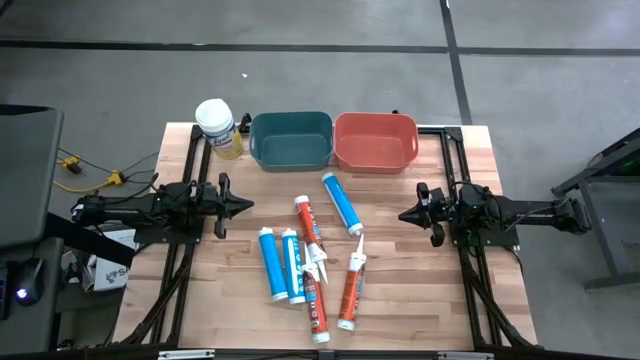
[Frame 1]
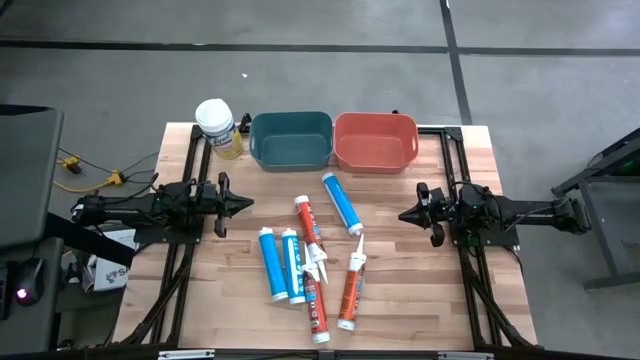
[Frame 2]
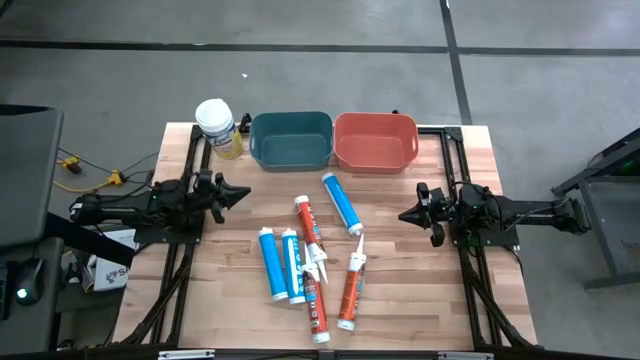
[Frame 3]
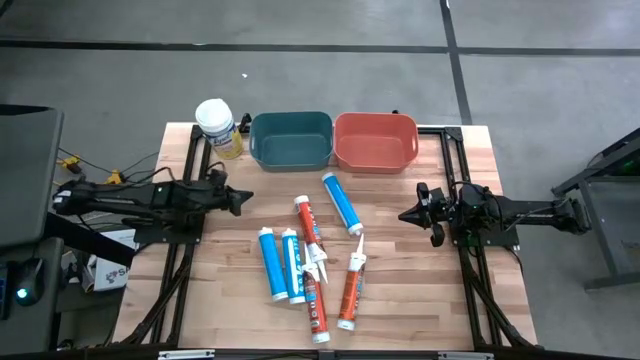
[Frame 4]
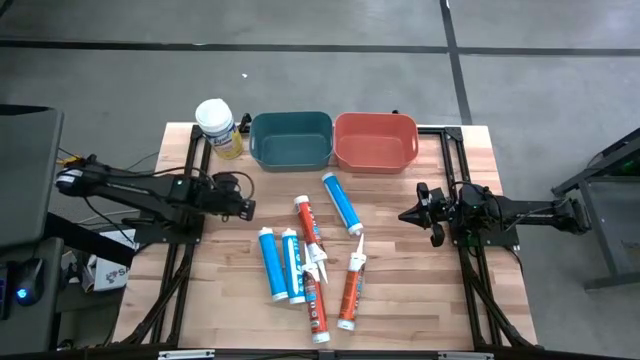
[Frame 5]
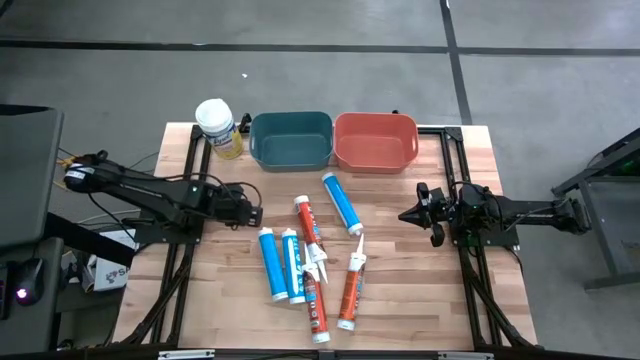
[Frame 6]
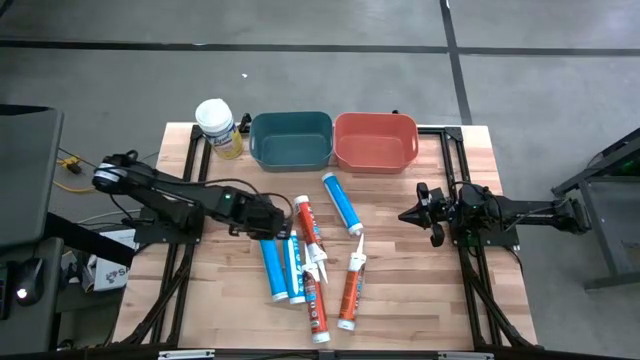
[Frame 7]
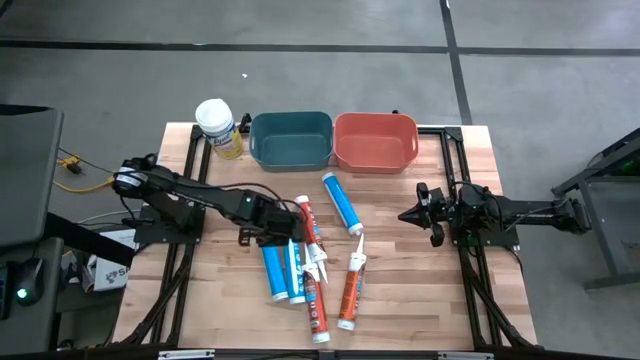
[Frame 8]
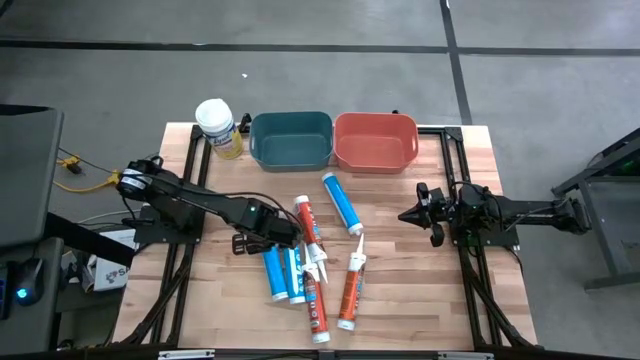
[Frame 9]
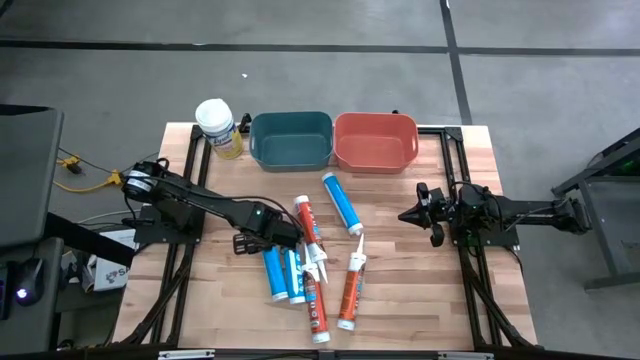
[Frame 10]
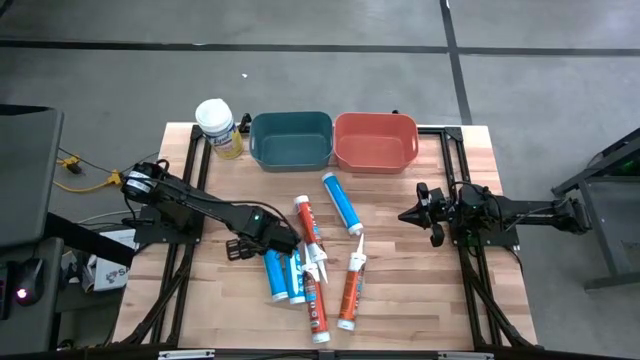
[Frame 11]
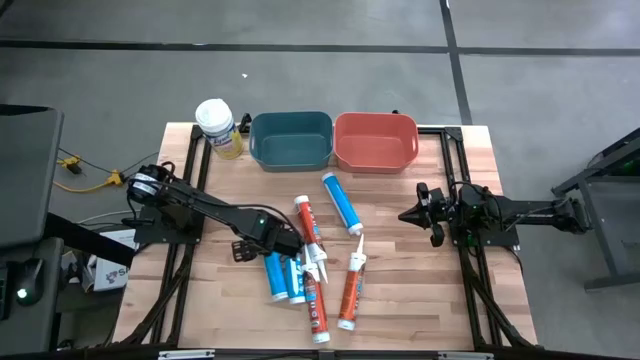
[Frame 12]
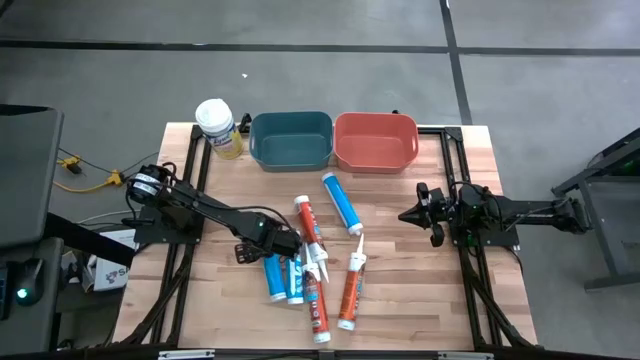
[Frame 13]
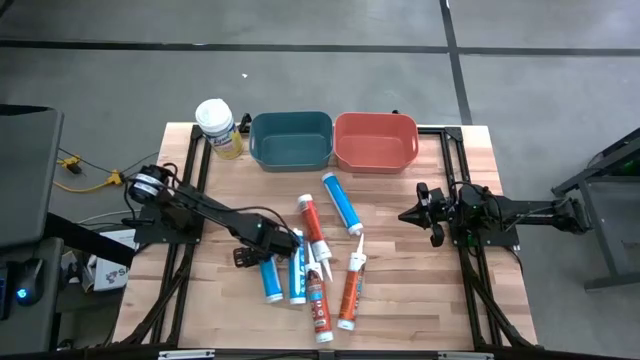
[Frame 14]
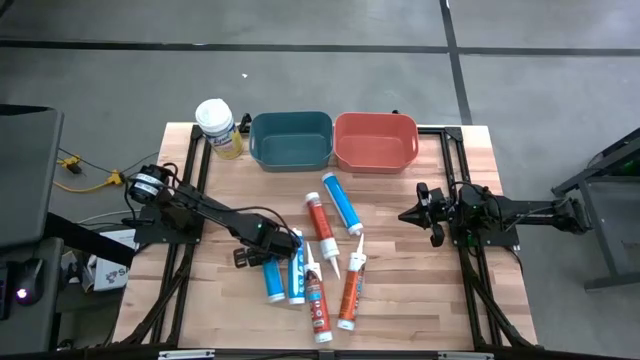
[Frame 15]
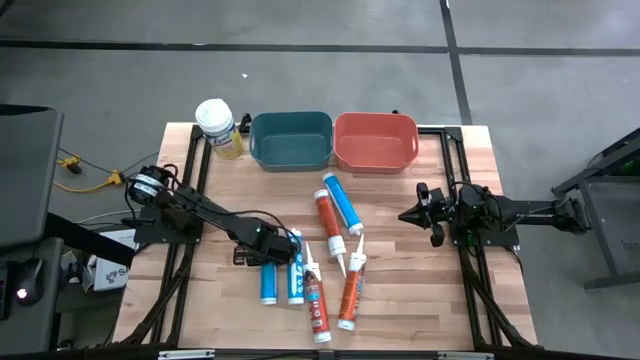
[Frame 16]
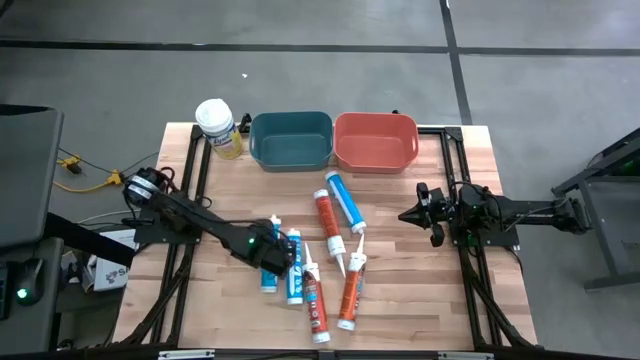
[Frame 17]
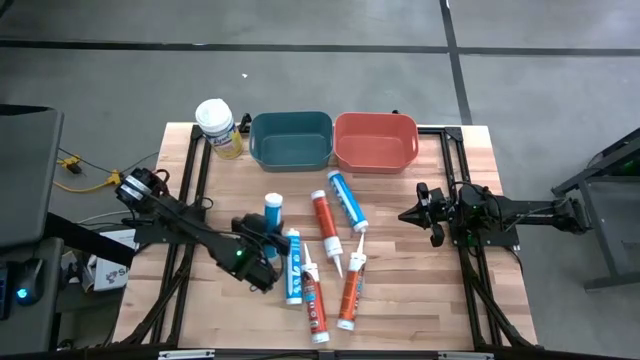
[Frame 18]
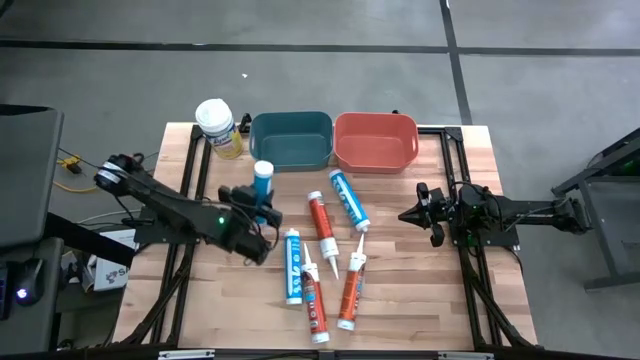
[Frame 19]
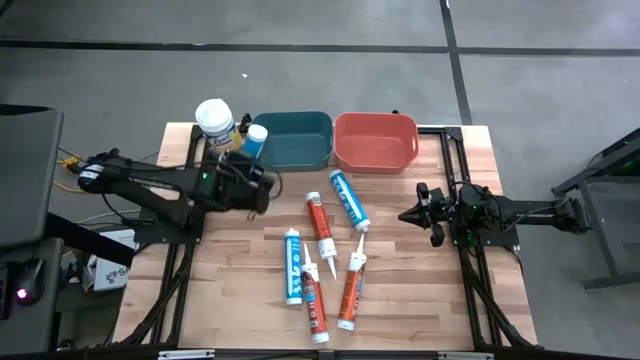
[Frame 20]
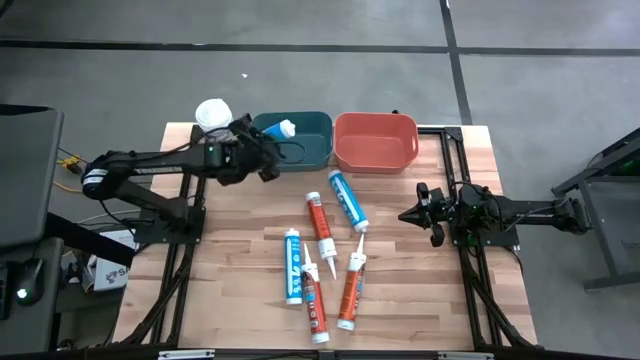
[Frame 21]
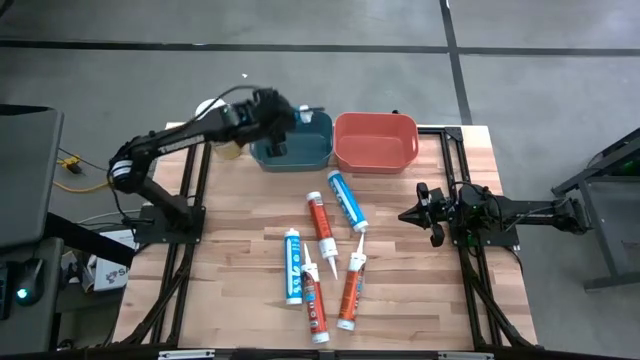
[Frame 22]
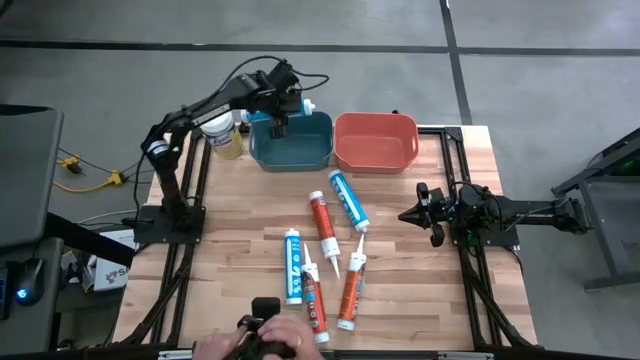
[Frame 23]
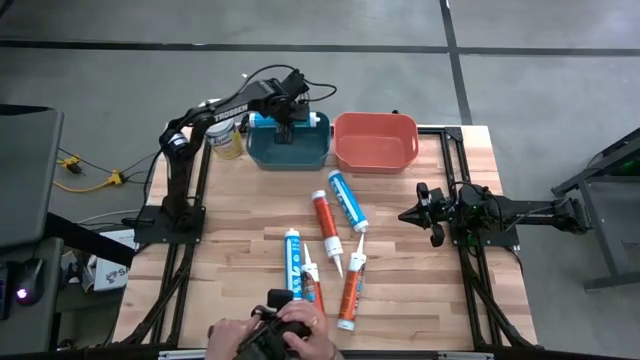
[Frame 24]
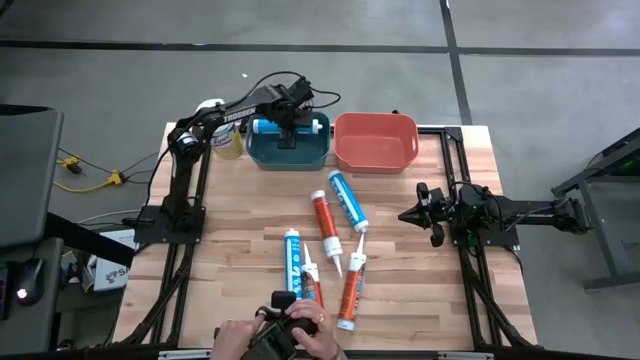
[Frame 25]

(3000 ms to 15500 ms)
Task: Pick & place silicon tubes, Sealant and Lysol wipes
Put the left blue sealant into the blue bin

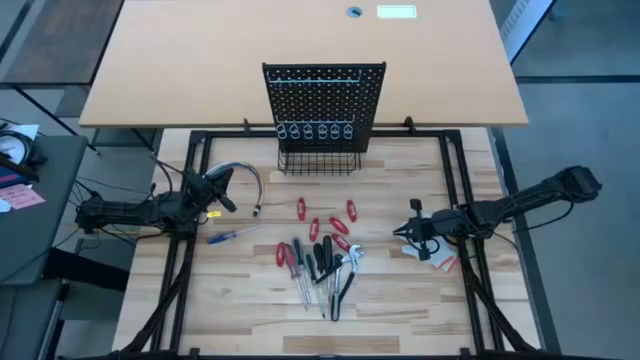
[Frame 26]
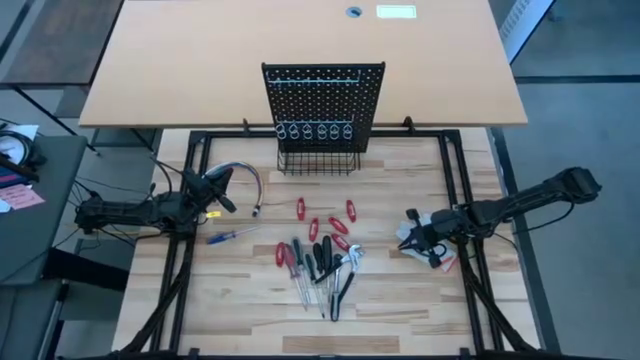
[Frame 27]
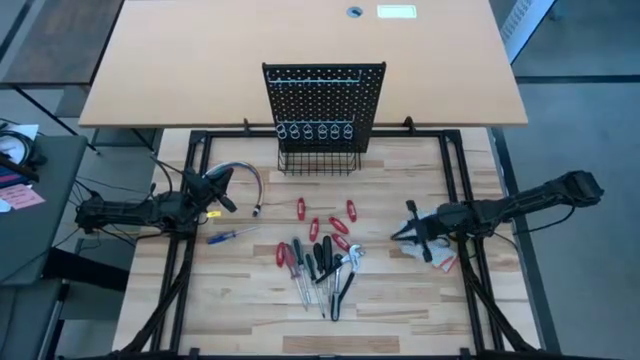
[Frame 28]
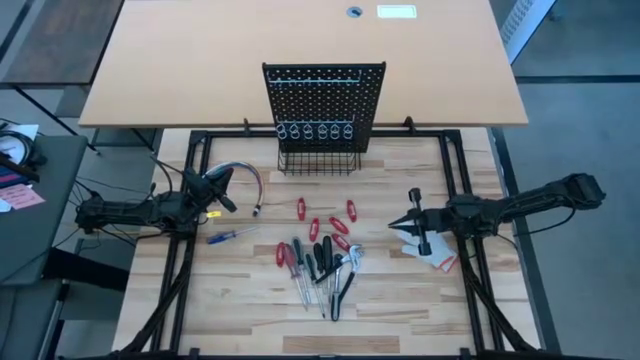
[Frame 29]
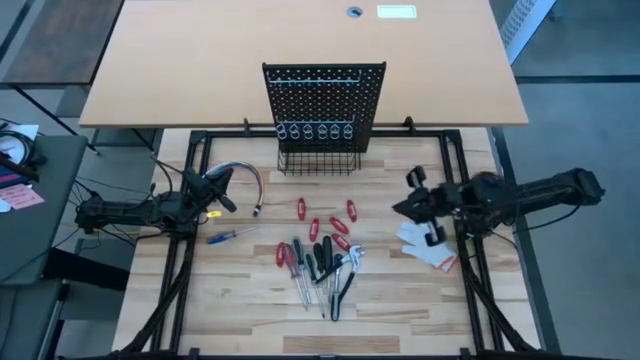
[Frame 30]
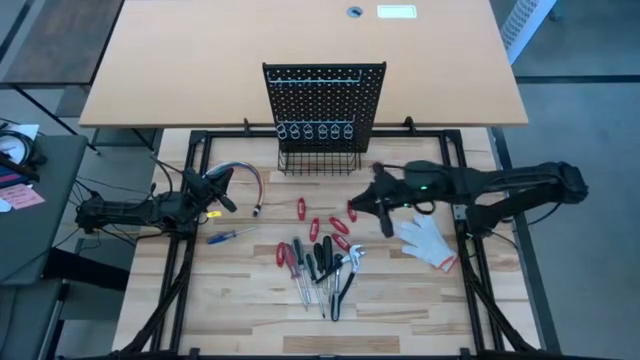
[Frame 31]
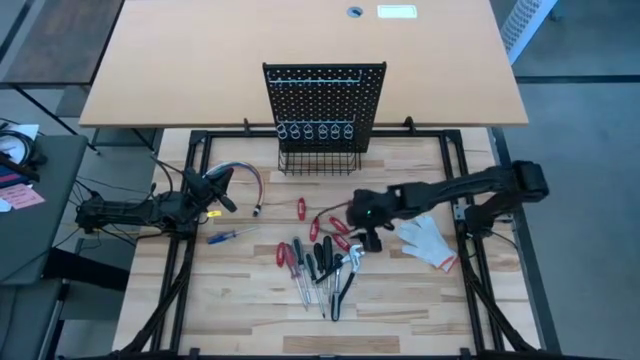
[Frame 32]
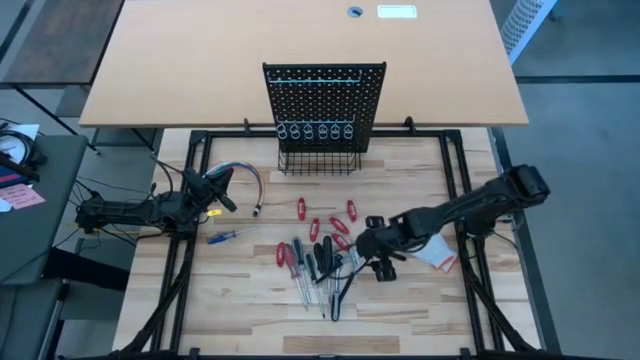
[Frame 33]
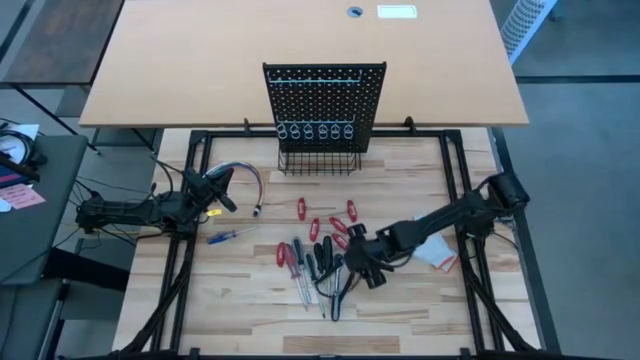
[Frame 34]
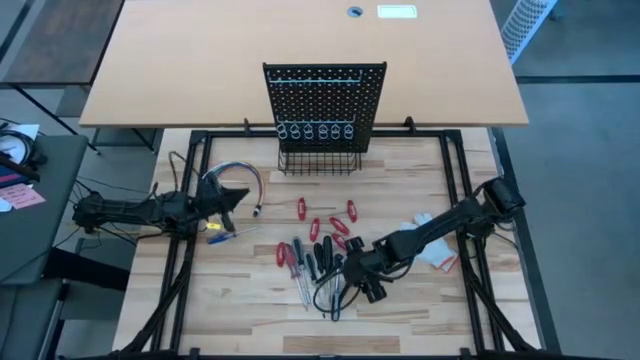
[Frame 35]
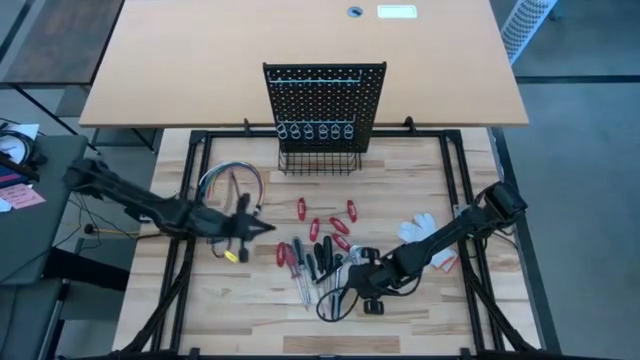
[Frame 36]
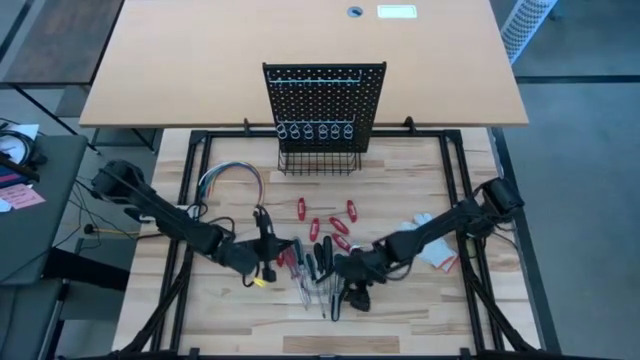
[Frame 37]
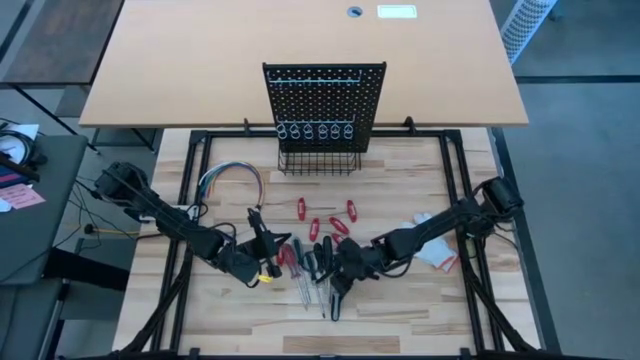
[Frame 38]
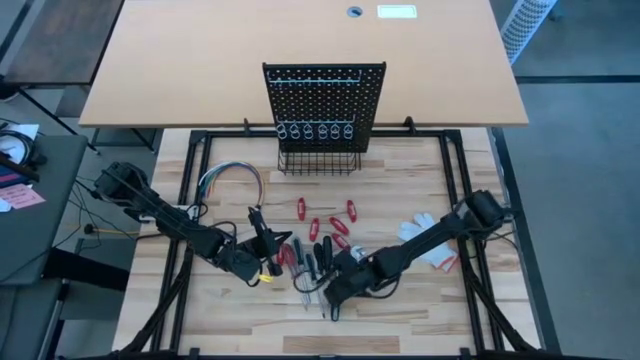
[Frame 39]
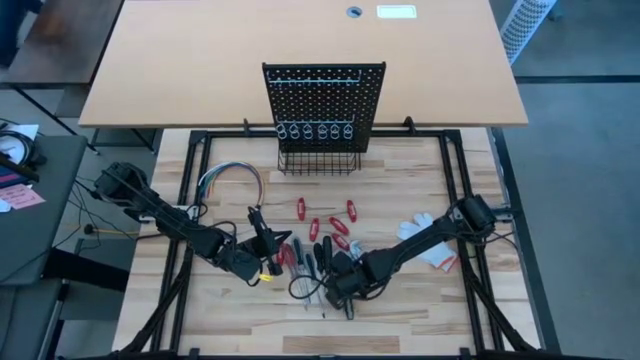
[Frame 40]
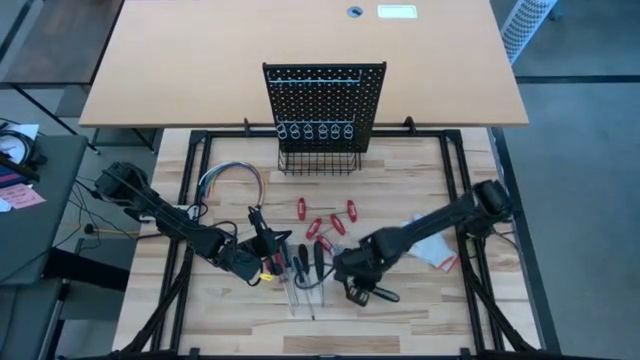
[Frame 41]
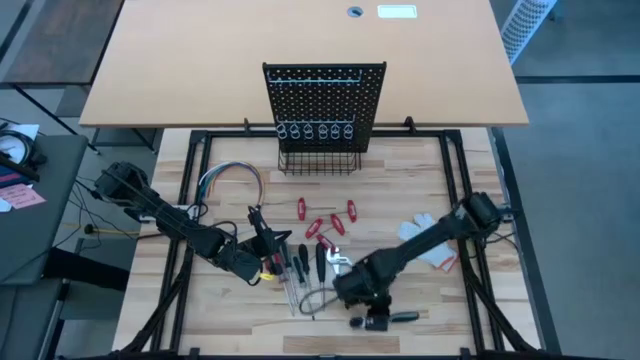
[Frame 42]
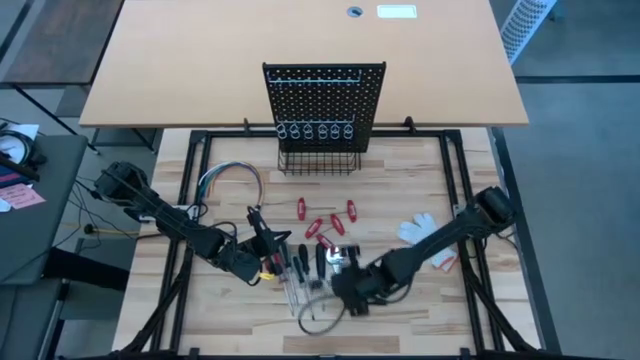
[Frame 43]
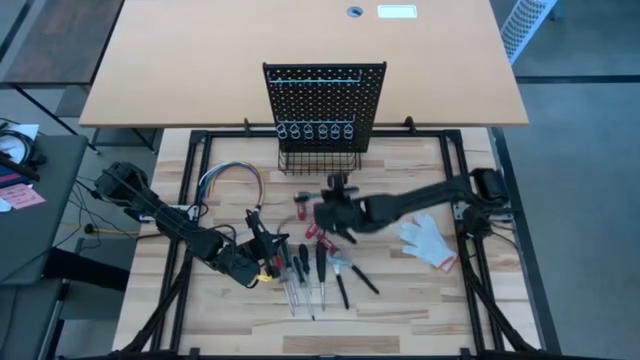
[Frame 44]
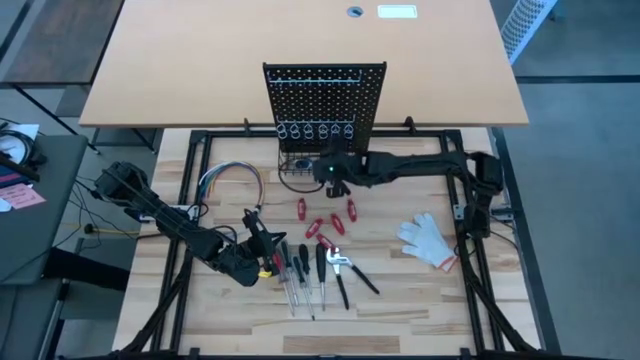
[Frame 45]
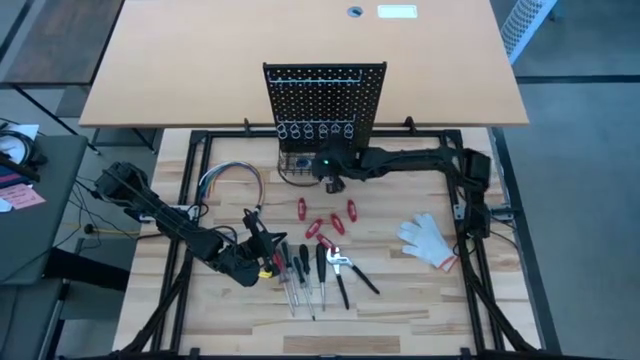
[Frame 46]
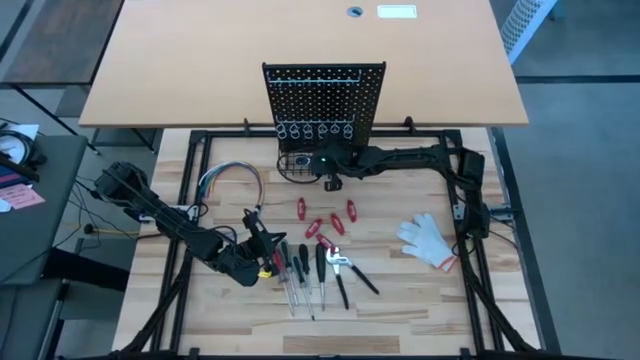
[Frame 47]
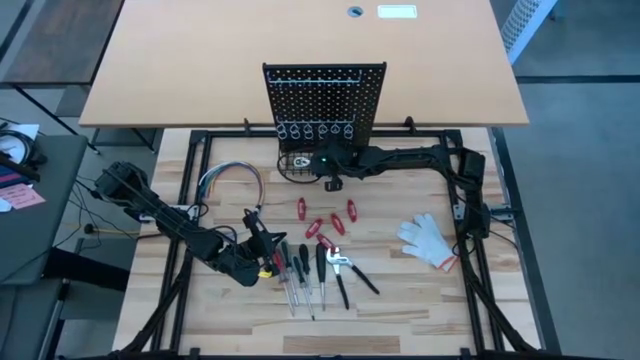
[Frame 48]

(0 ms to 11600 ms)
Task: Hang tools onto peg board
Put the ratchet wrench into the black wire basket on the pegboard
